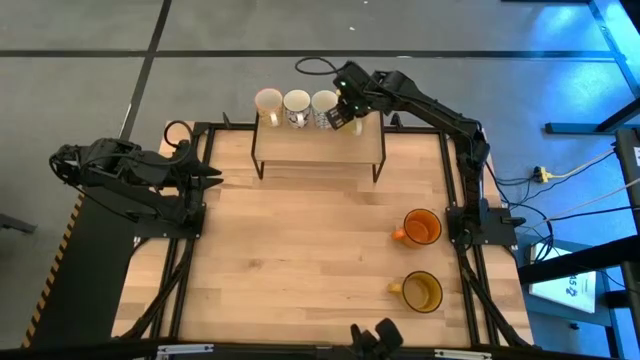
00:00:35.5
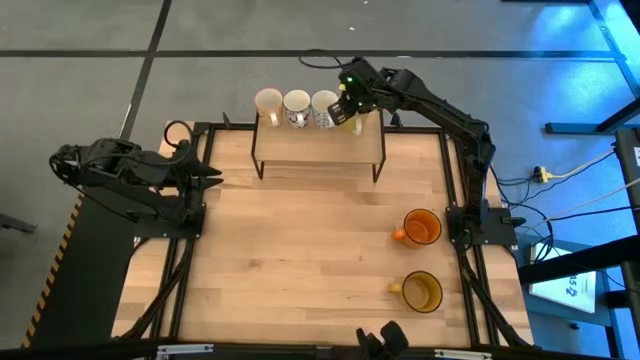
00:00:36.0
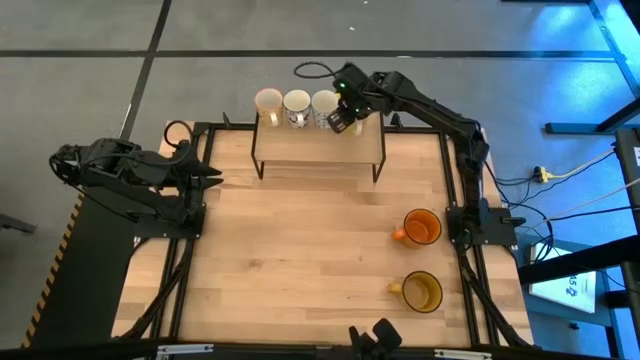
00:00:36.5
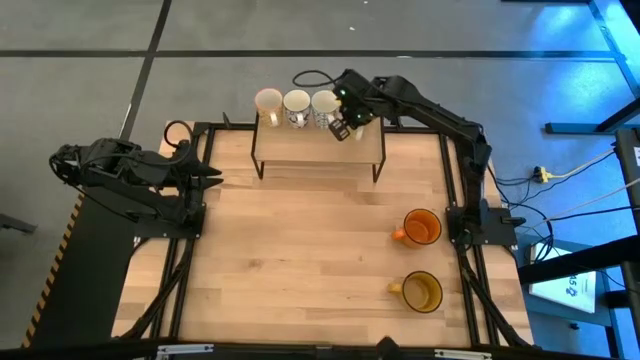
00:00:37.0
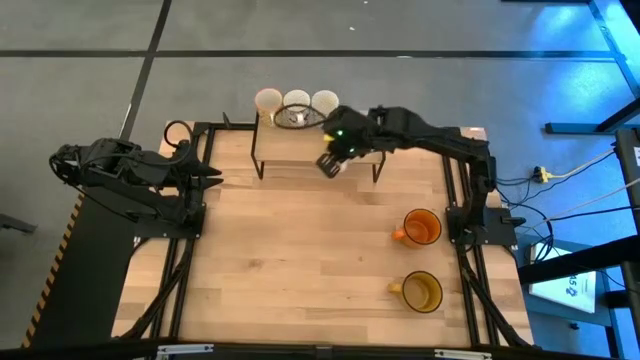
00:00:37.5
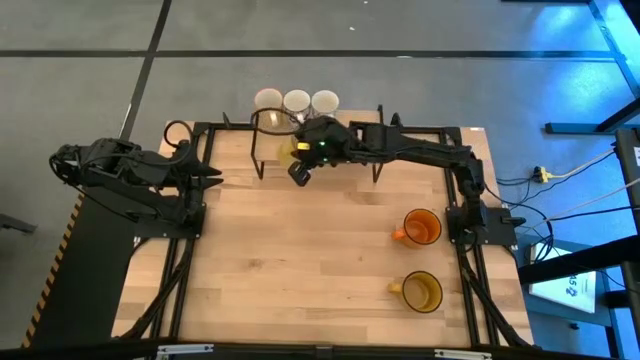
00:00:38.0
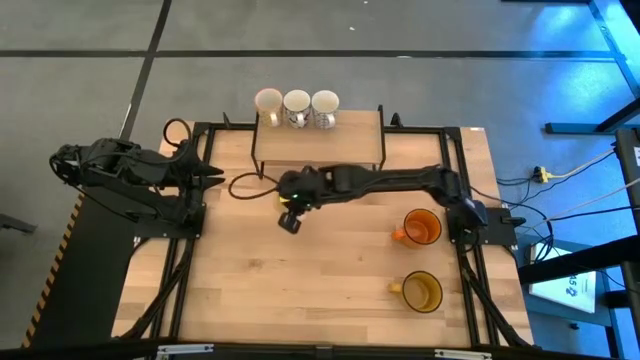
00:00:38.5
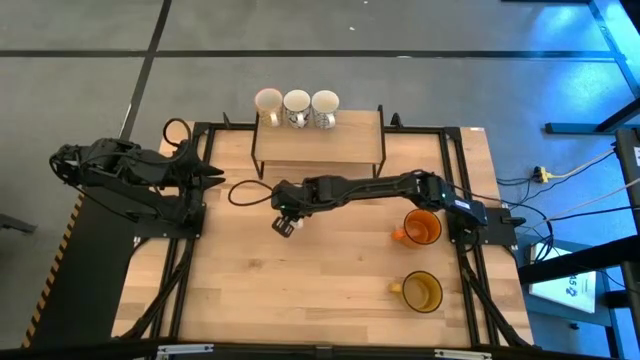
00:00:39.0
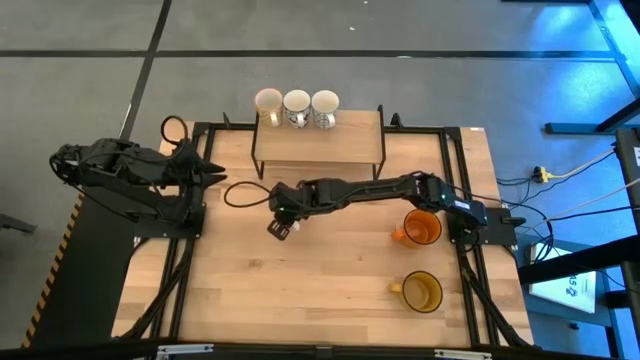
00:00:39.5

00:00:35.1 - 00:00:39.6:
Task: Place coffee mugs
Remove the yellow mug from the shelf

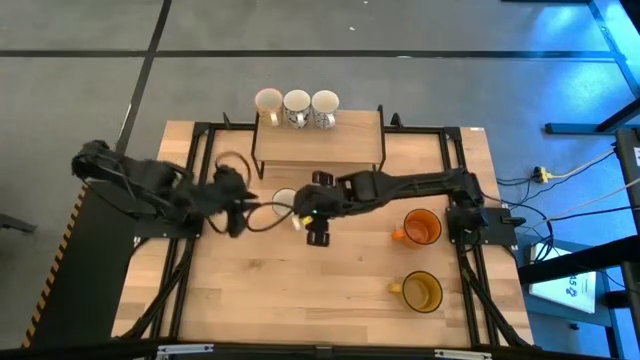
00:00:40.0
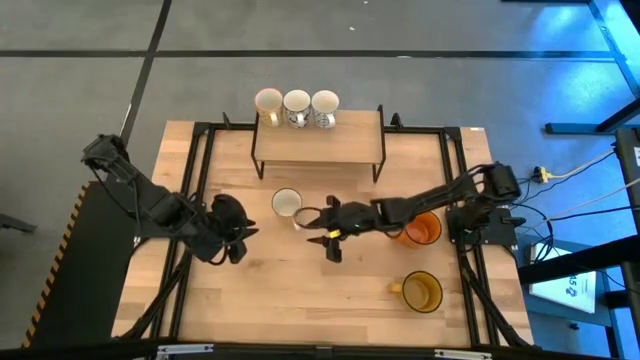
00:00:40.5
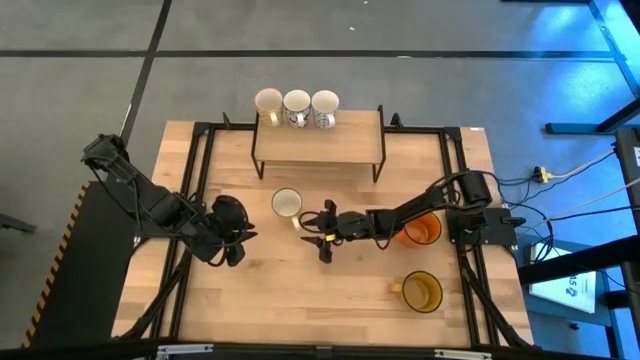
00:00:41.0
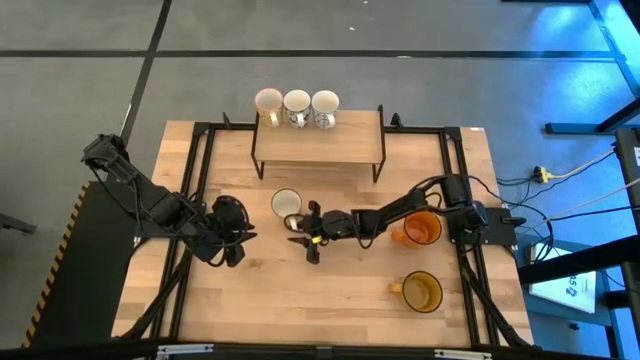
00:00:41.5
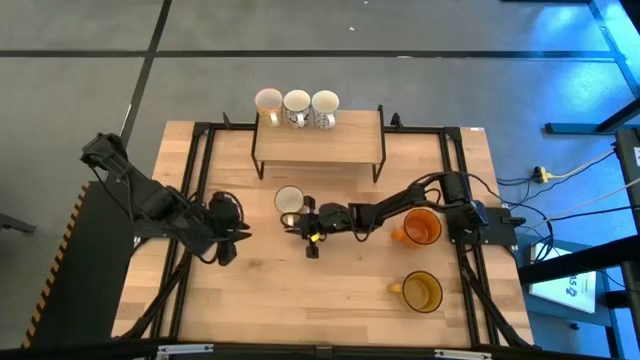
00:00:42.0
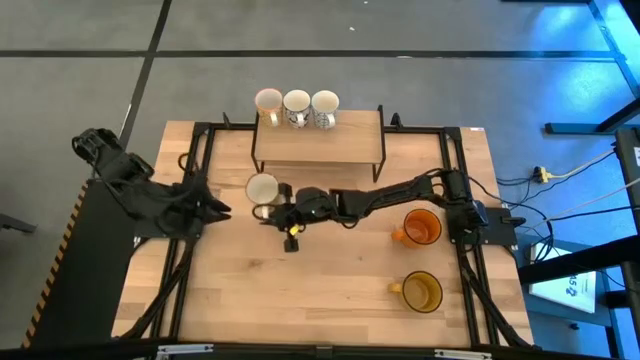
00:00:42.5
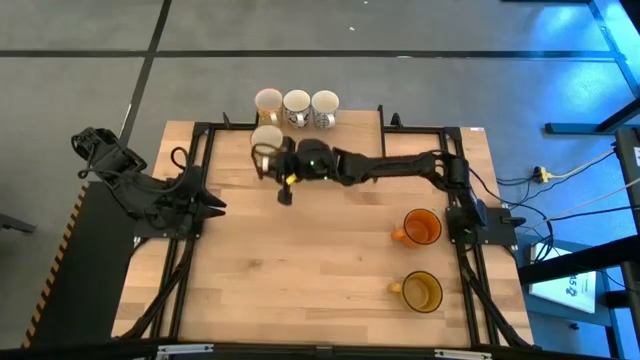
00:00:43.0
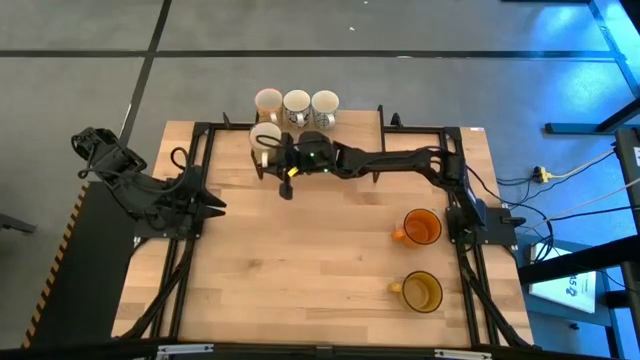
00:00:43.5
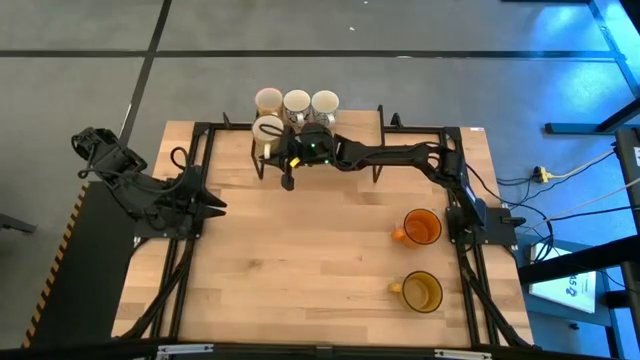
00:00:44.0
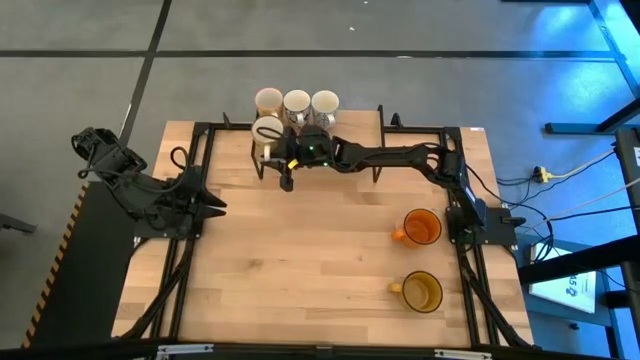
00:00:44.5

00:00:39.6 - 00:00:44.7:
Put the light yellow mug on the shelf

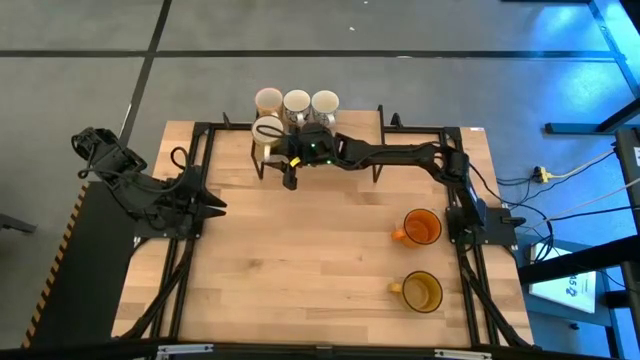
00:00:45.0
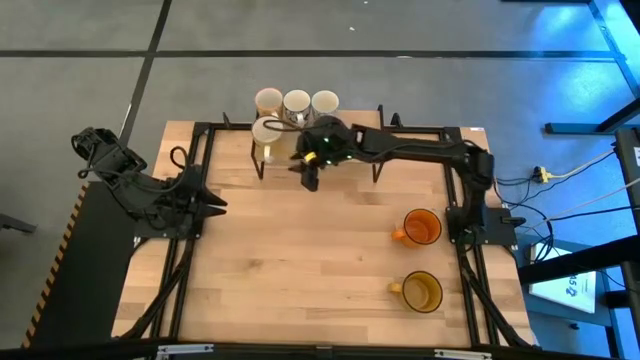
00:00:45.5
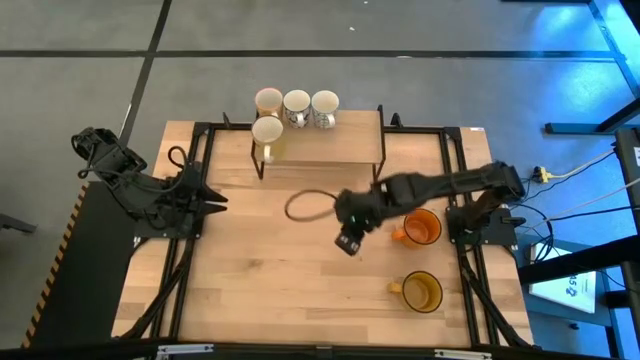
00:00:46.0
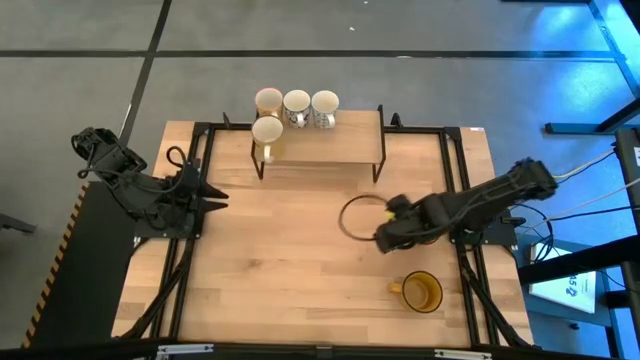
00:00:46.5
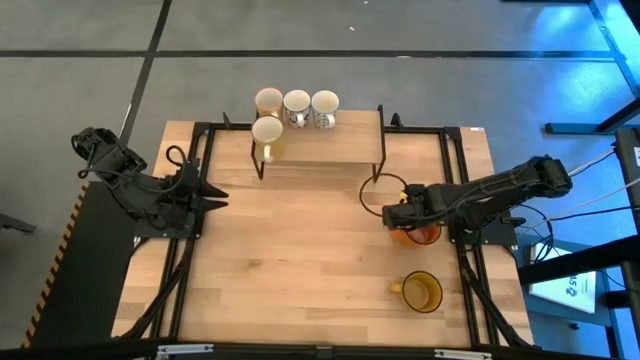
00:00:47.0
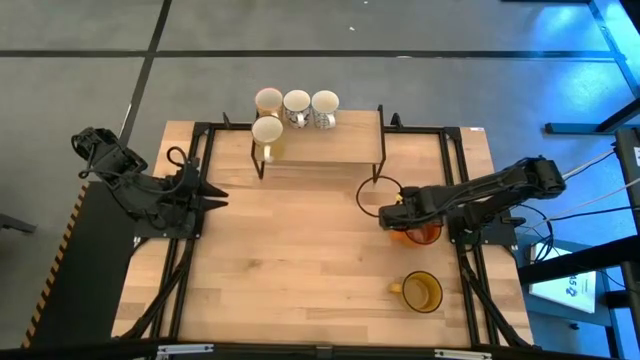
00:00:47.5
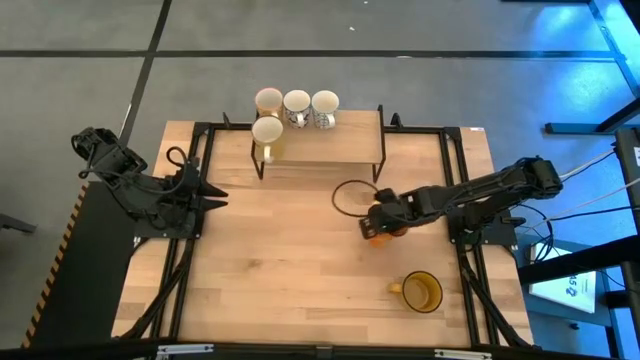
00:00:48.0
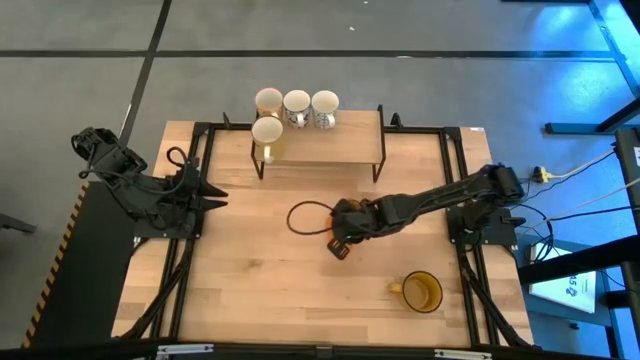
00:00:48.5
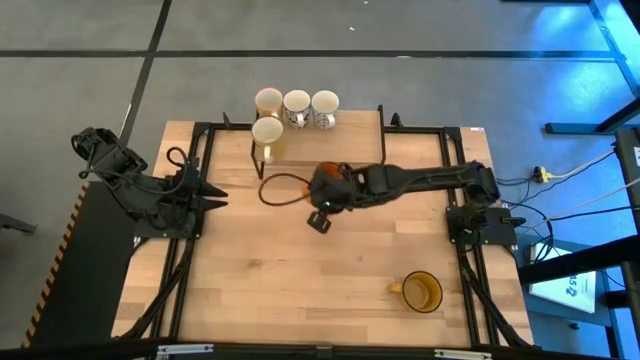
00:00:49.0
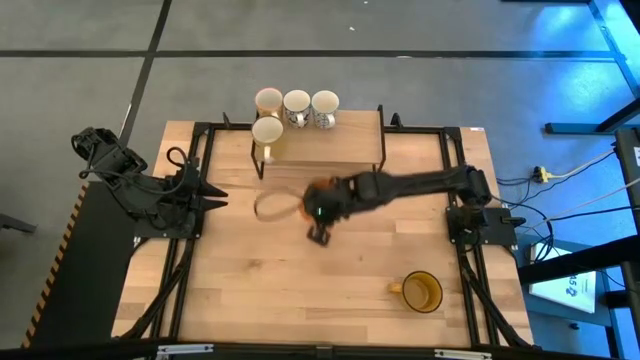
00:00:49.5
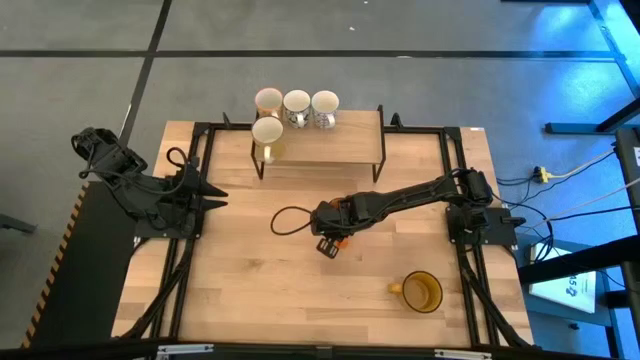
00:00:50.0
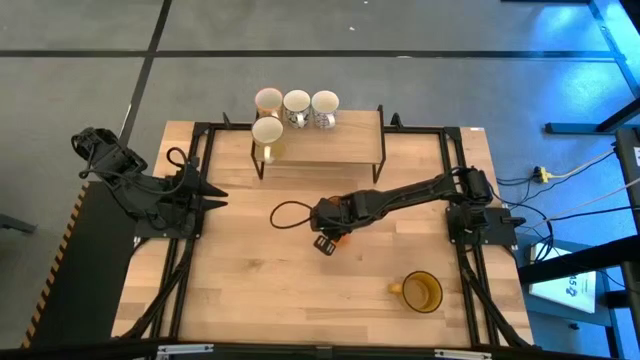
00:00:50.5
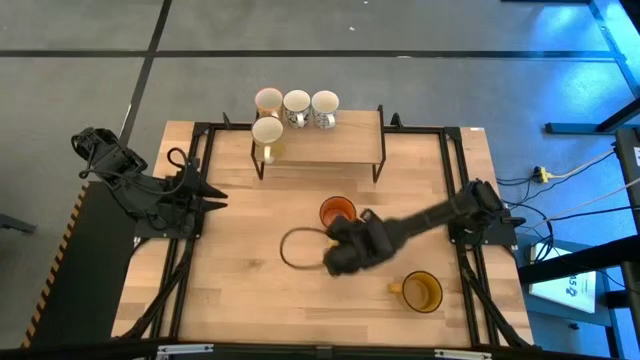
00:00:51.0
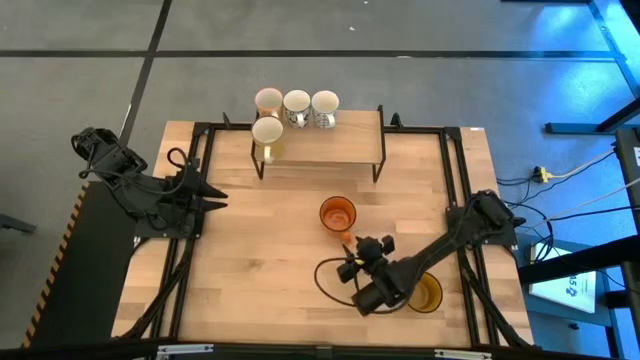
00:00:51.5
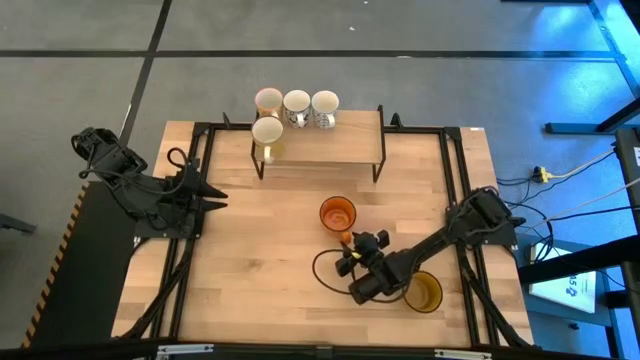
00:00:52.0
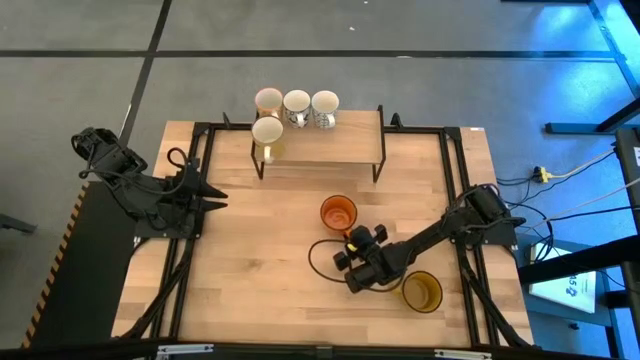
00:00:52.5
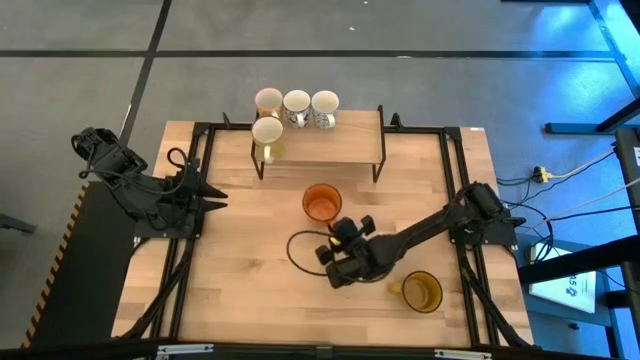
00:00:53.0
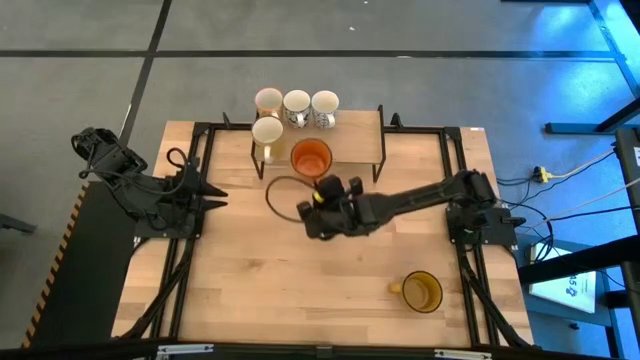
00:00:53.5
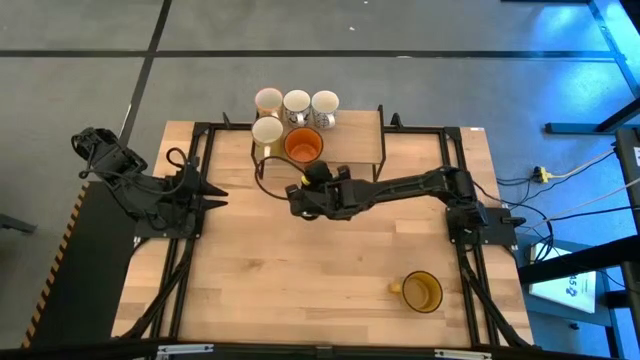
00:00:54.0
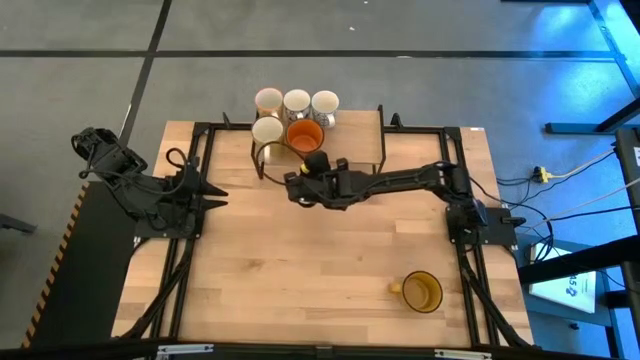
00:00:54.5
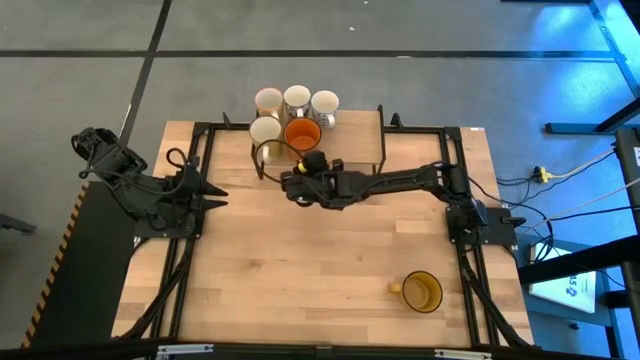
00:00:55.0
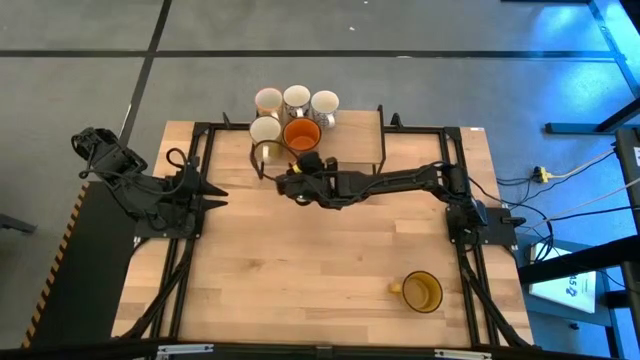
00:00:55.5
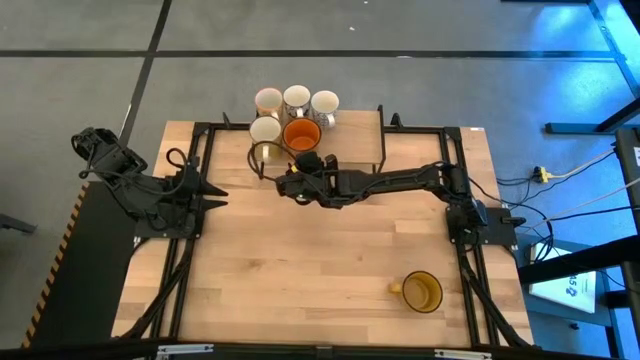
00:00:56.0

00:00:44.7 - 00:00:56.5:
Put the orange mug on the shelf
